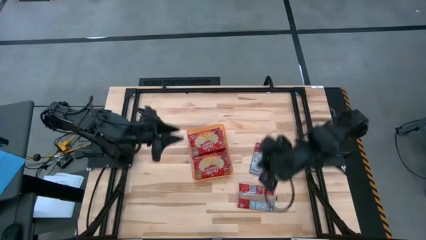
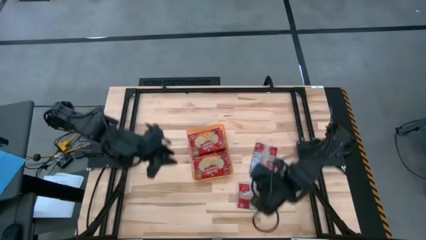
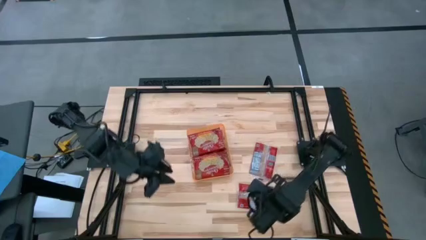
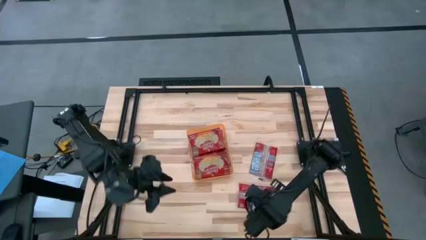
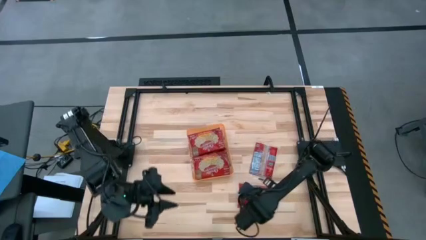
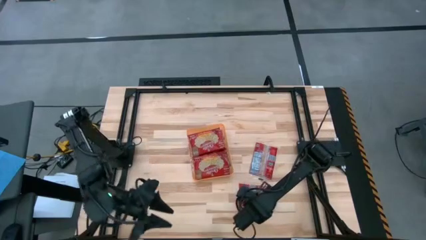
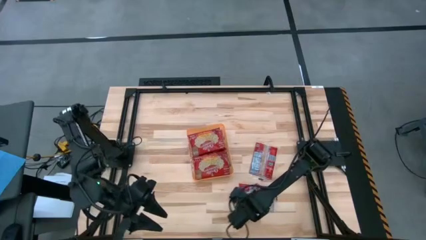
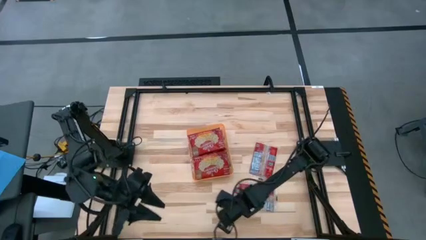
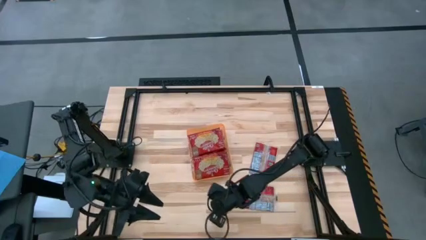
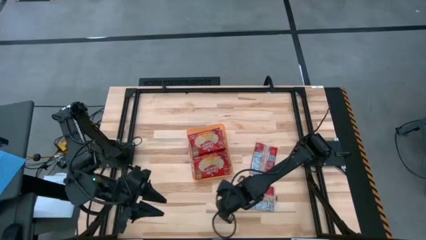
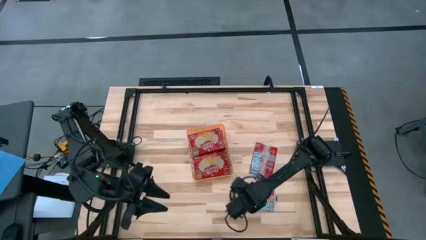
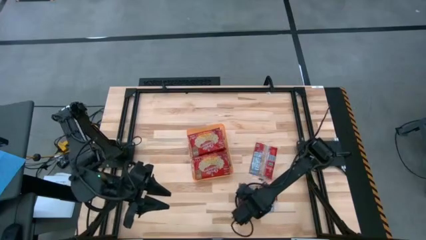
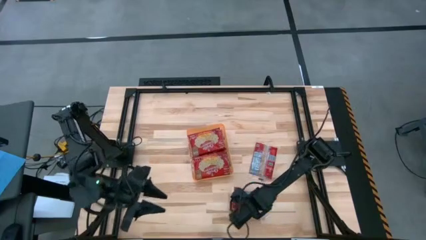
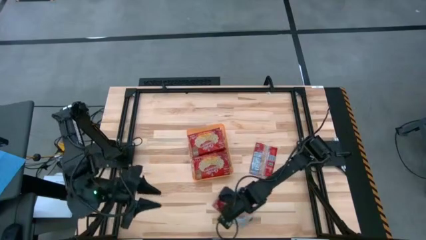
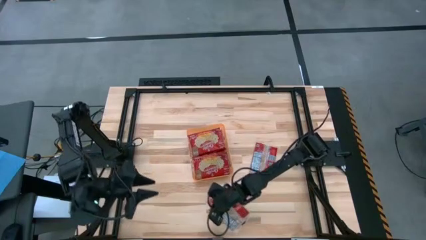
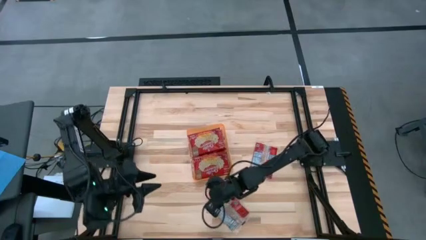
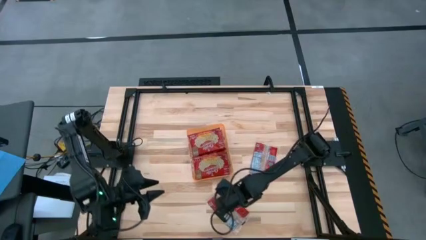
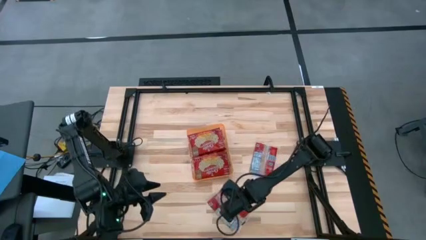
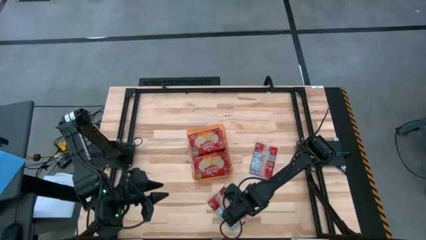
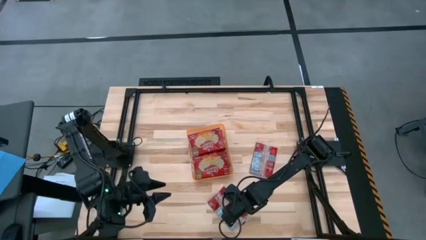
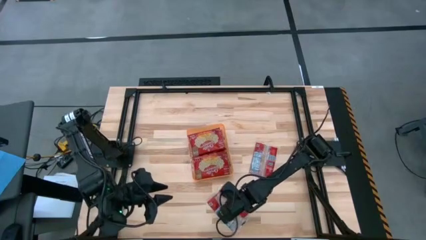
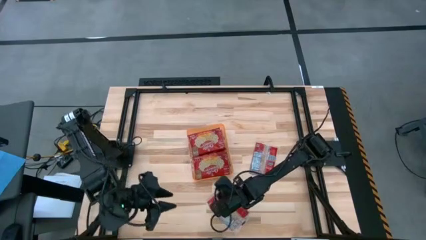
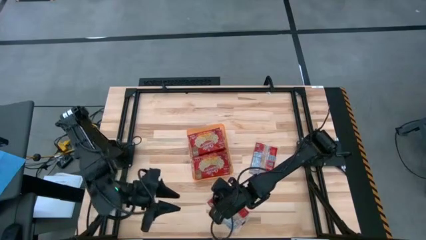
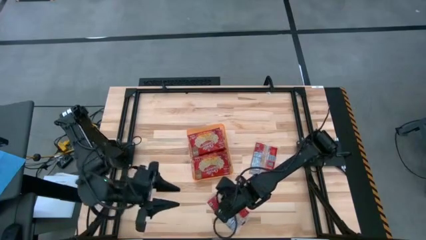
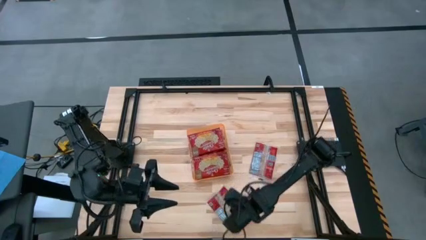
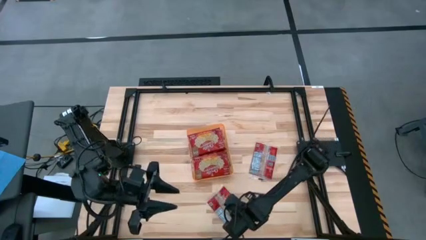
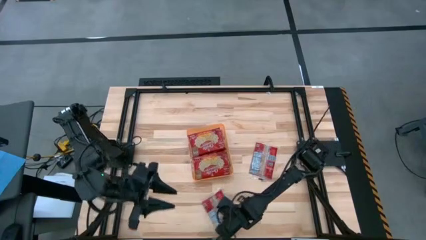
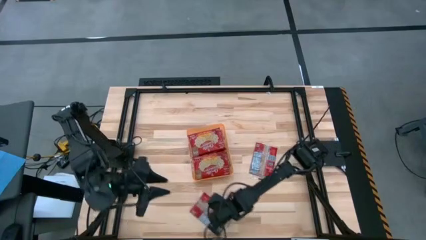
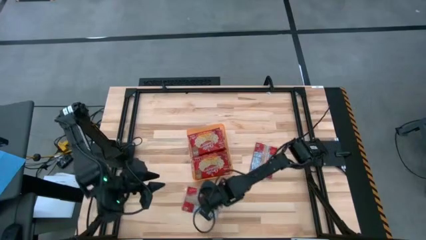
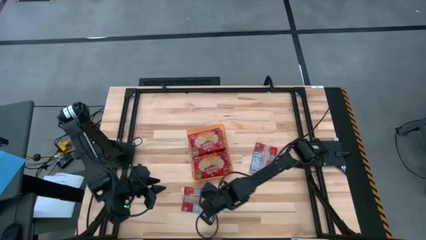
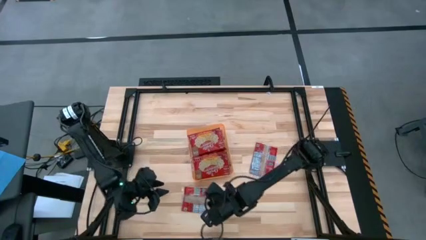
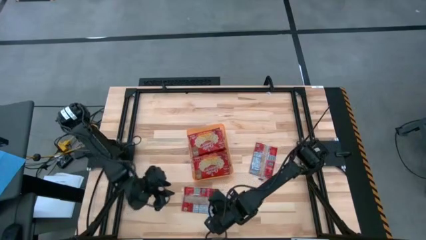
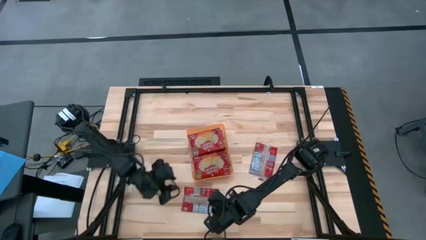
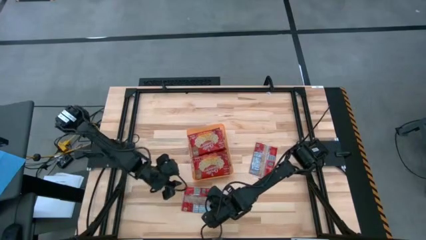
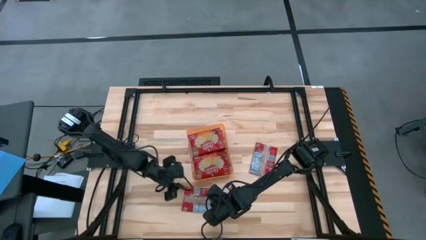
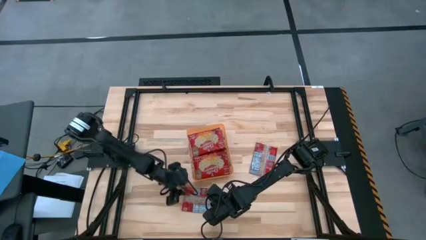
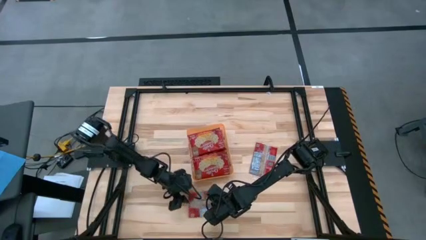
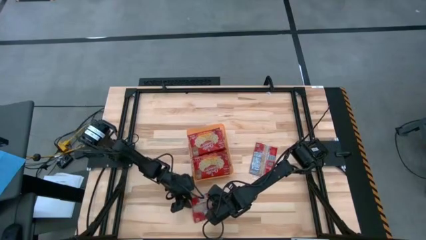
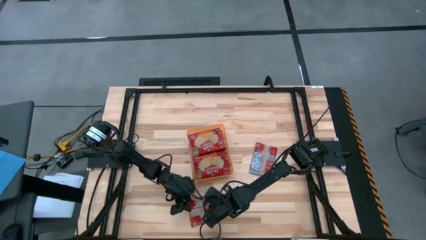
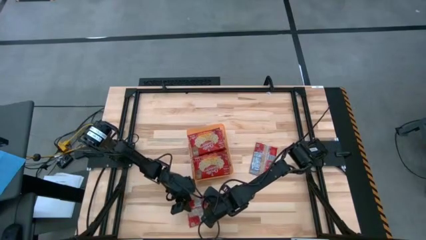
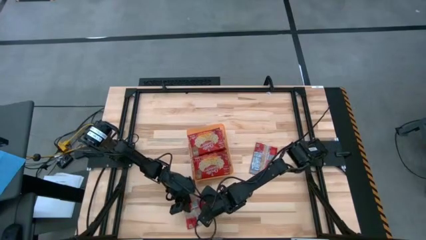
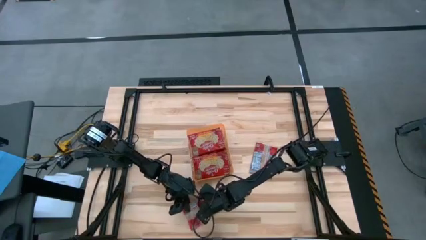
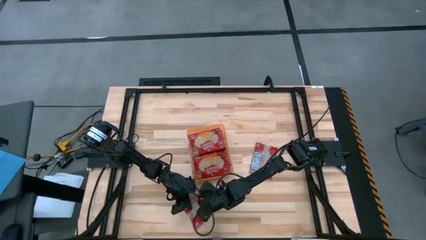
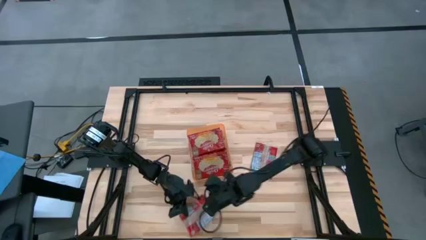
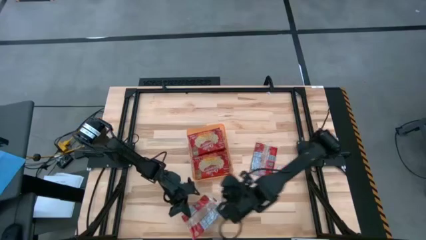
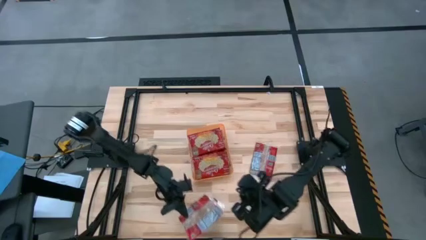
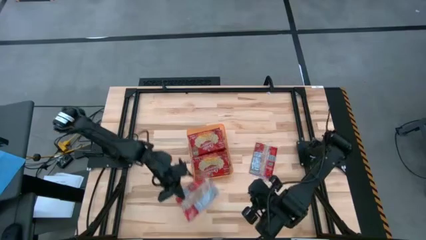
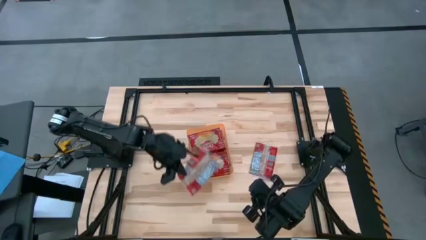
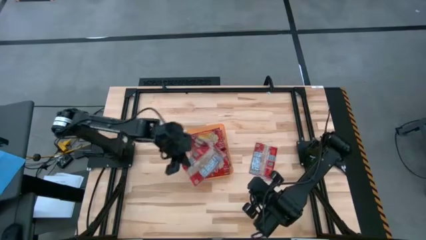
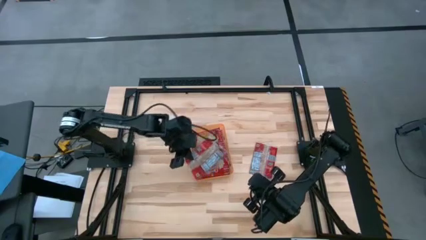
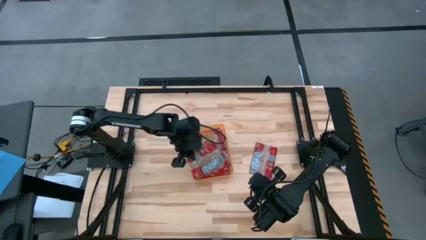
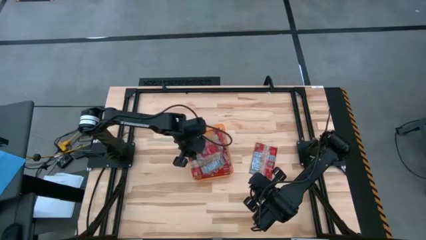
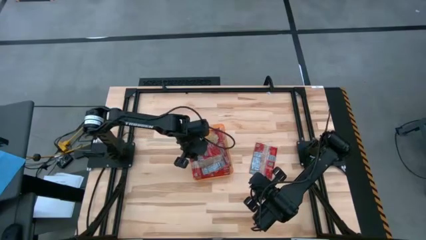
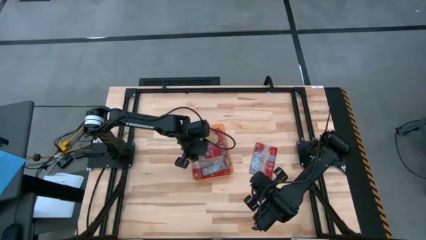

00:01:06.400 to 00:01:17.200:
Task: Sort popcorn bags into baskets
Put the red popcorn bag into the orange bin

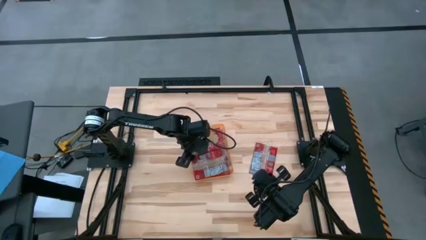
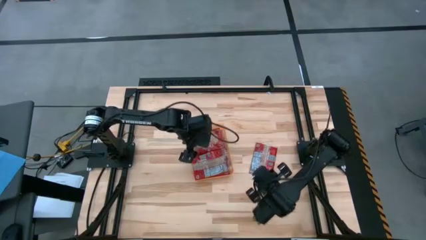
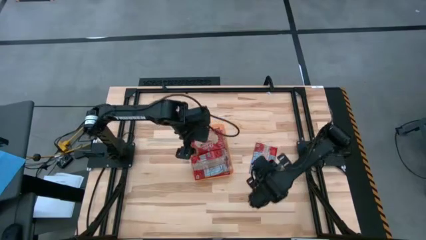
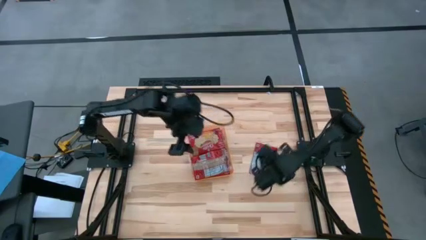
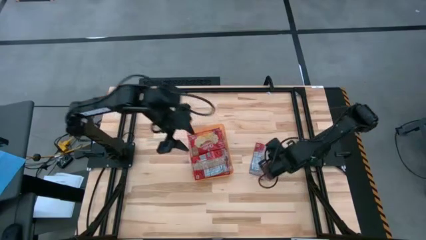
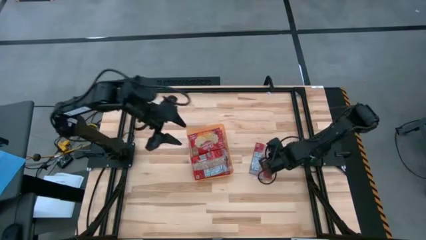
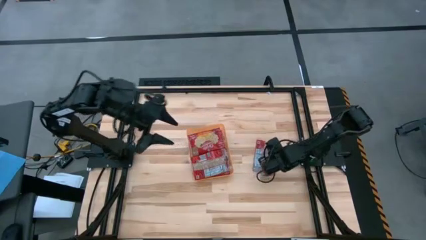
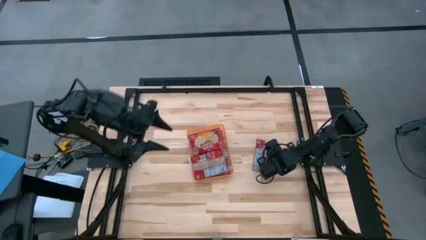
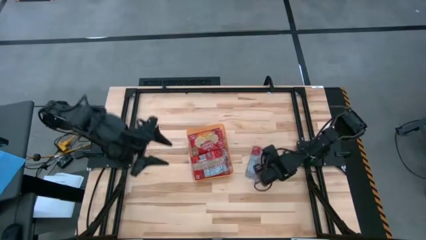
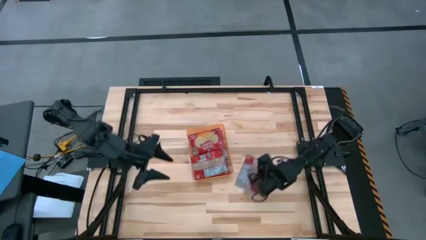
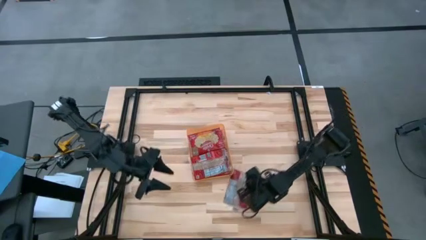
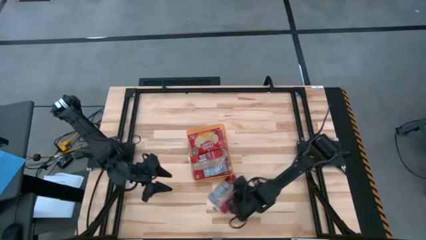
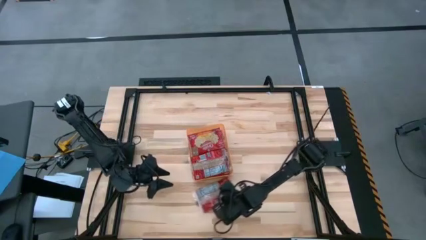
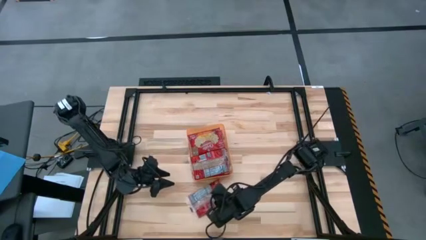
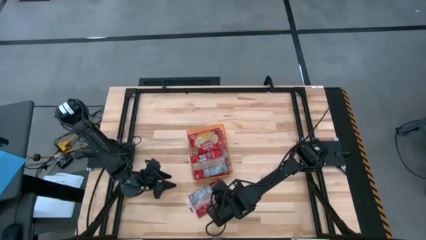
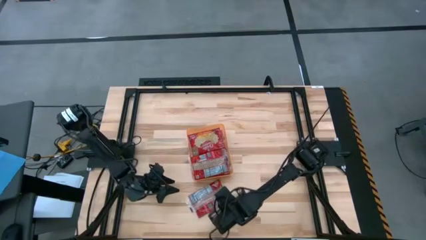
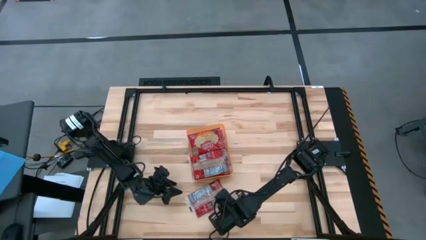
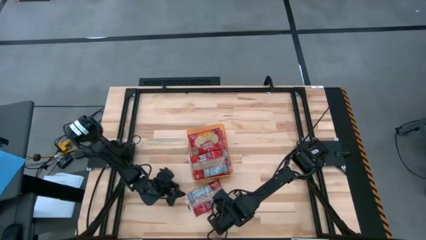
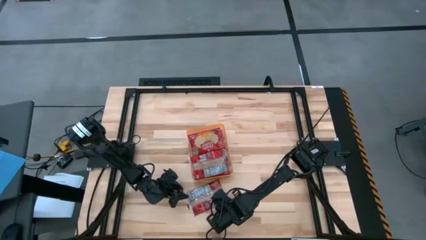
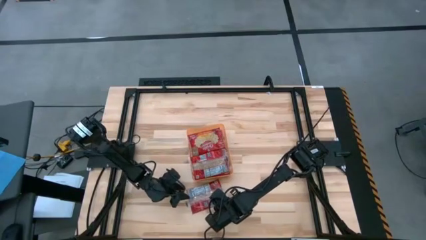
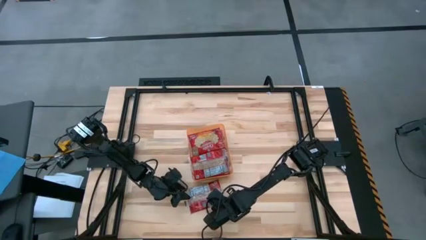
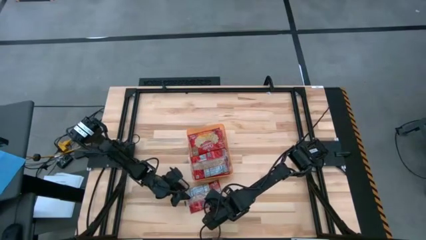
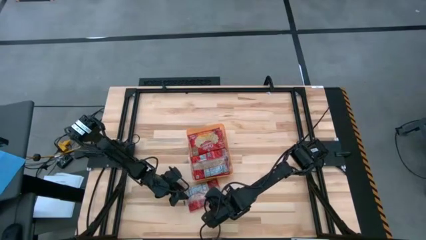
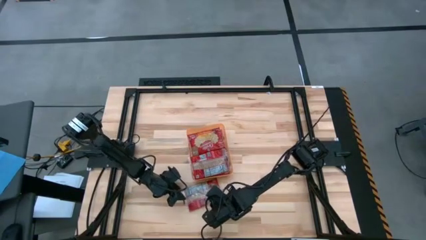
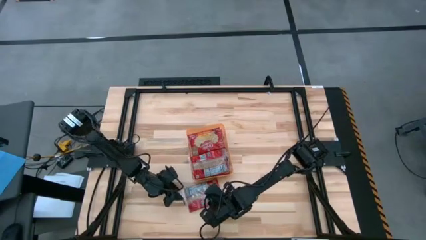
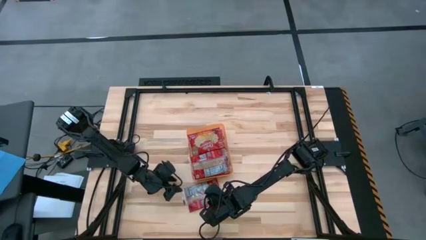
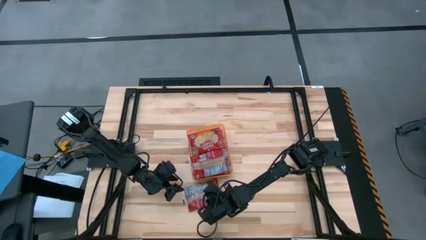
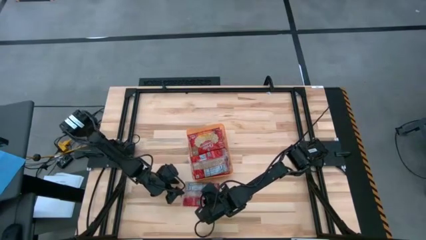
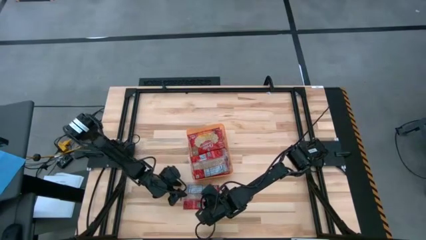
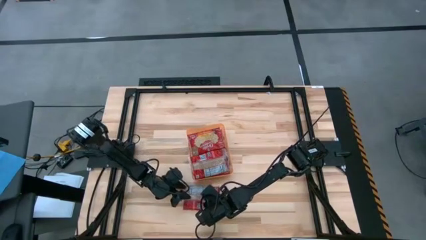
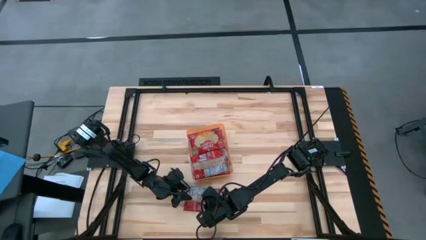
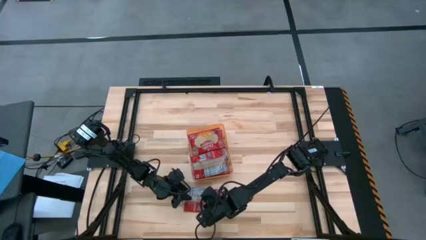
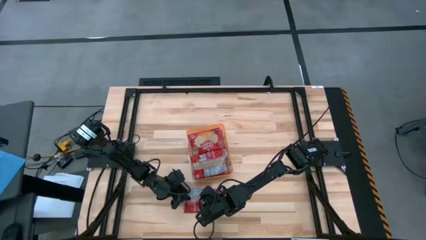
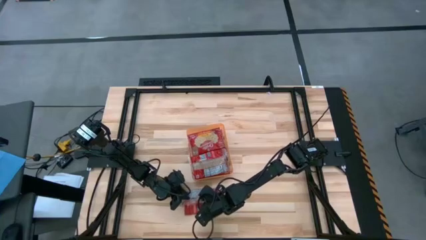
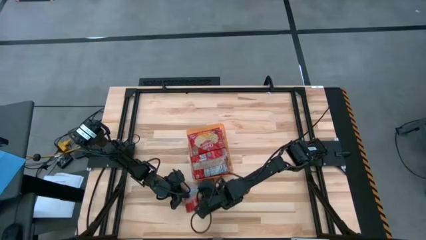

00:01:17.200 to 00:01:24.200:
Put the red popcorn bag into the orange bin
